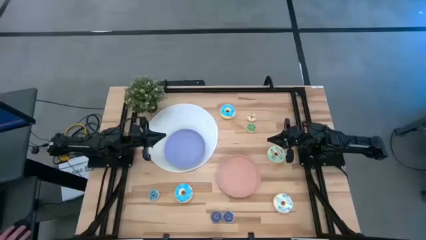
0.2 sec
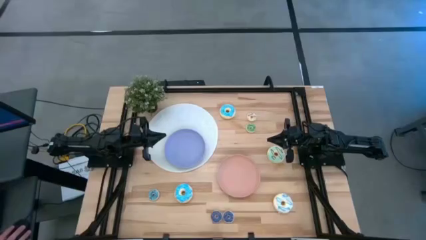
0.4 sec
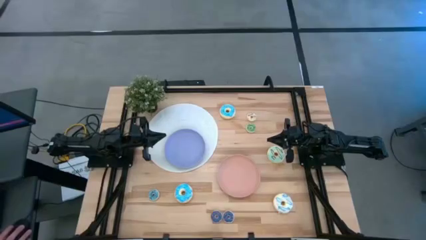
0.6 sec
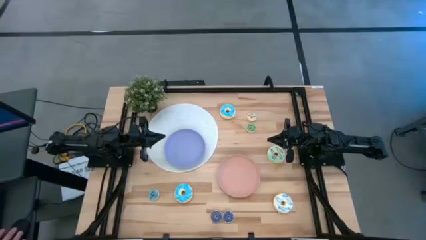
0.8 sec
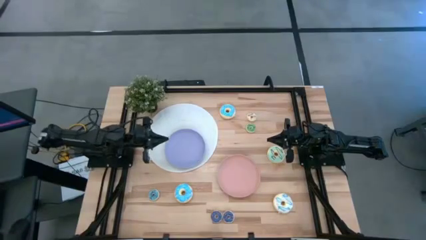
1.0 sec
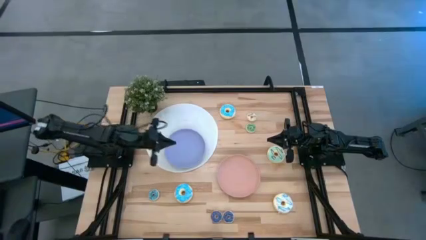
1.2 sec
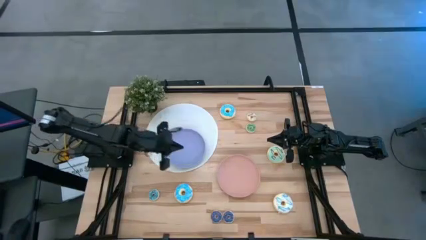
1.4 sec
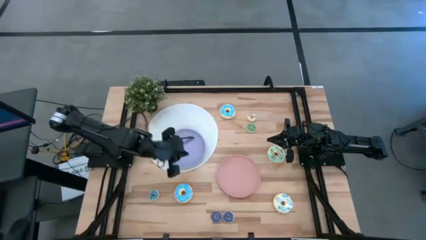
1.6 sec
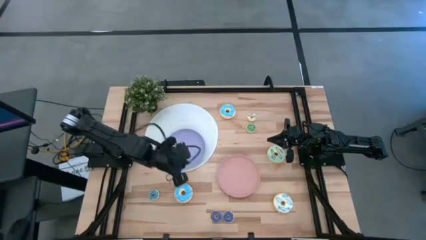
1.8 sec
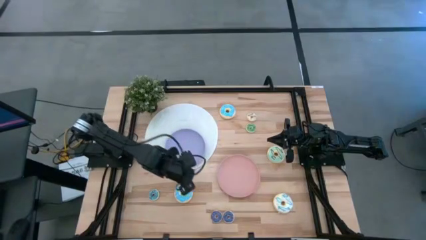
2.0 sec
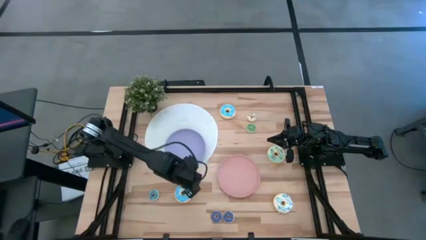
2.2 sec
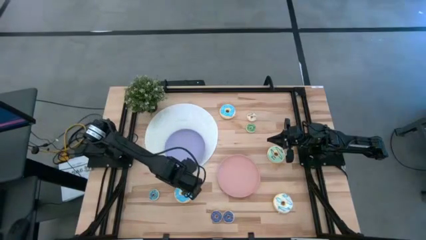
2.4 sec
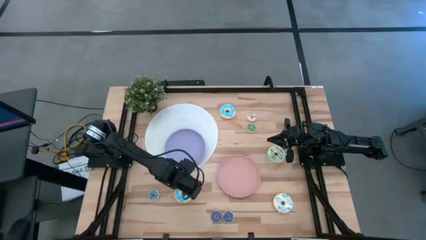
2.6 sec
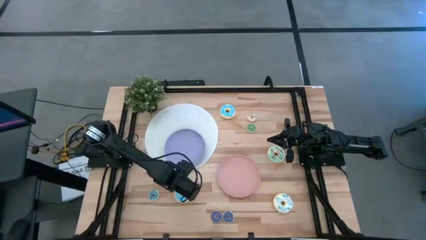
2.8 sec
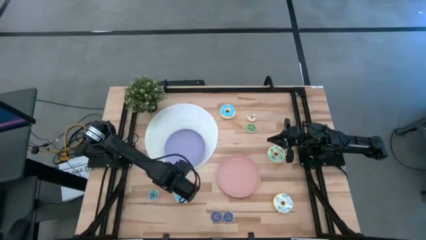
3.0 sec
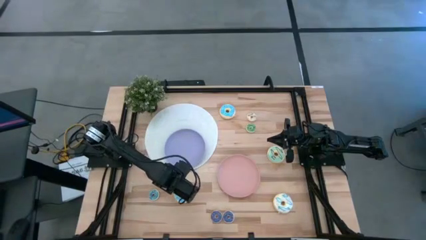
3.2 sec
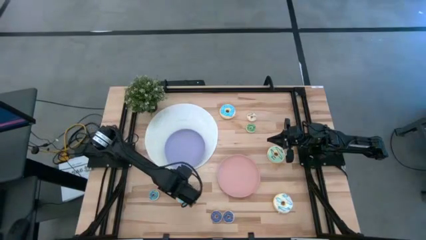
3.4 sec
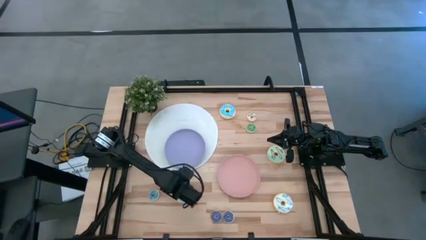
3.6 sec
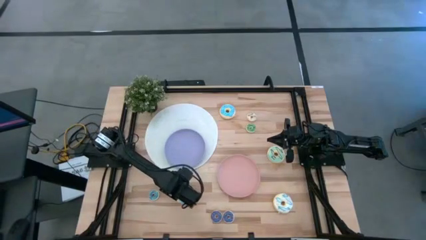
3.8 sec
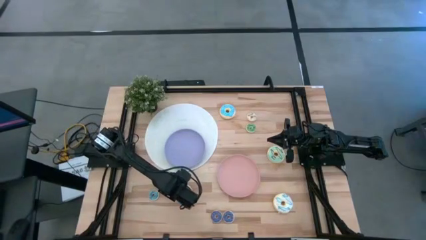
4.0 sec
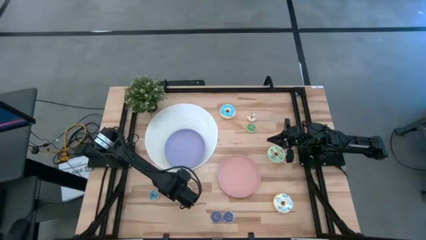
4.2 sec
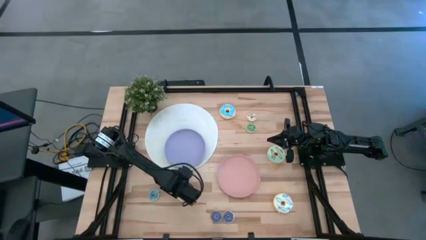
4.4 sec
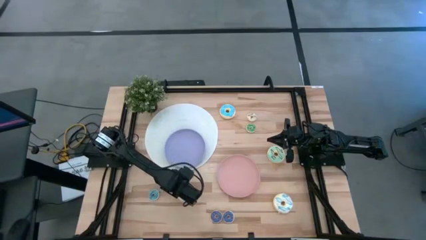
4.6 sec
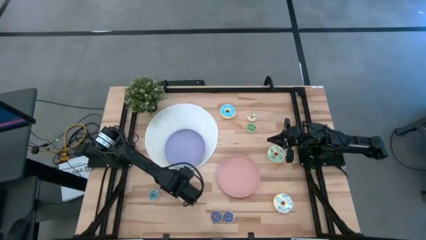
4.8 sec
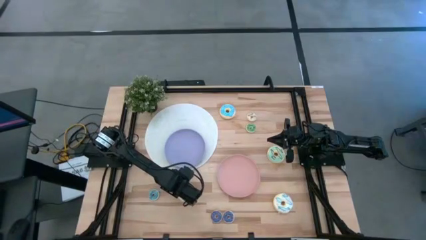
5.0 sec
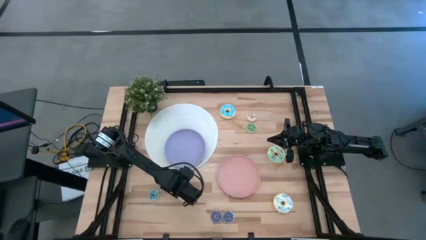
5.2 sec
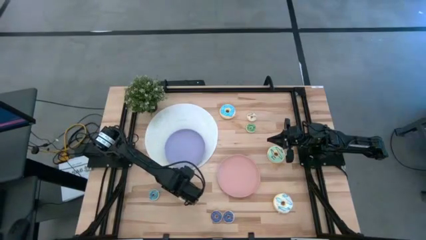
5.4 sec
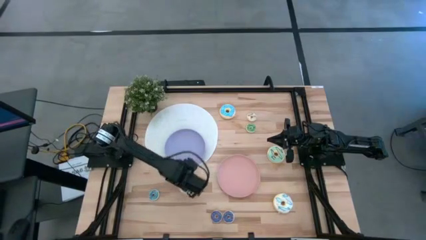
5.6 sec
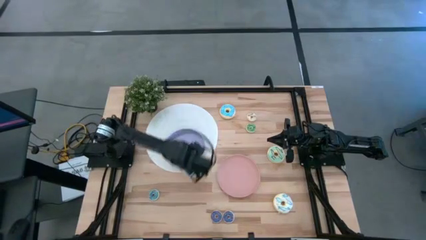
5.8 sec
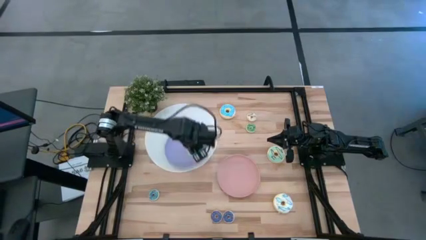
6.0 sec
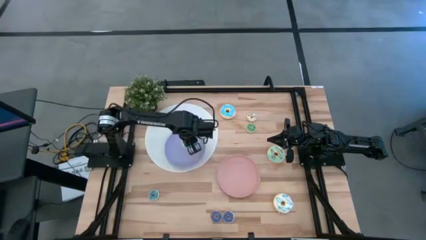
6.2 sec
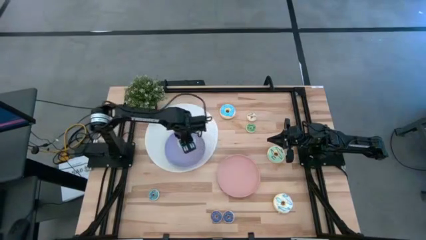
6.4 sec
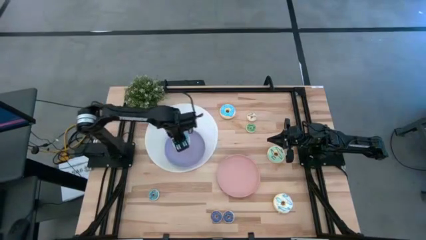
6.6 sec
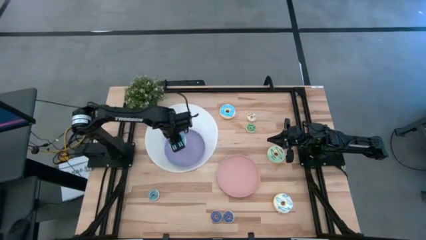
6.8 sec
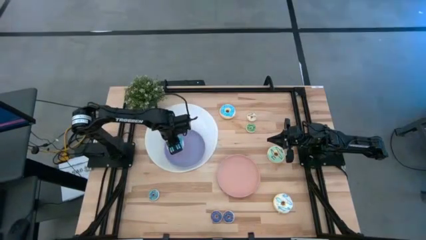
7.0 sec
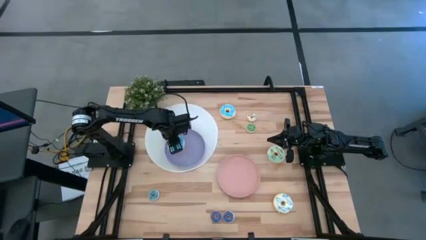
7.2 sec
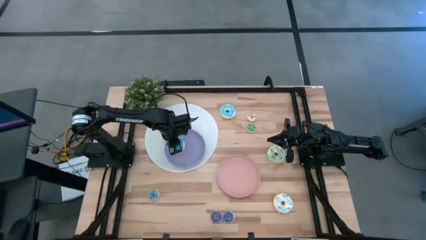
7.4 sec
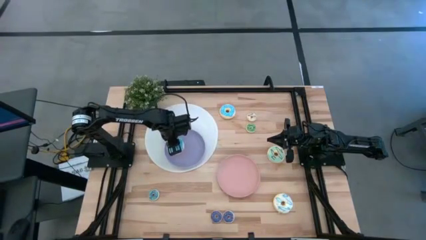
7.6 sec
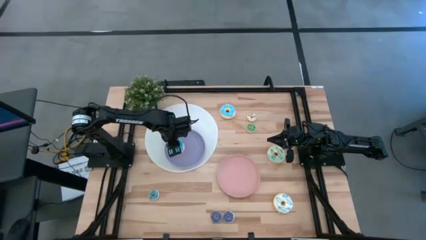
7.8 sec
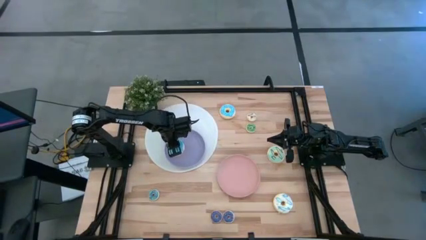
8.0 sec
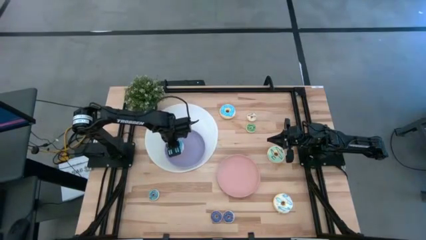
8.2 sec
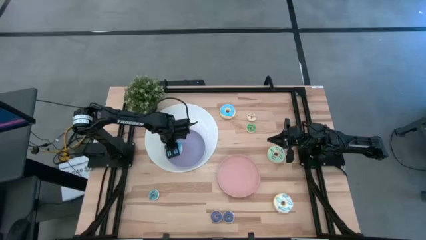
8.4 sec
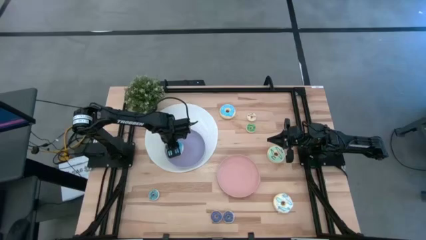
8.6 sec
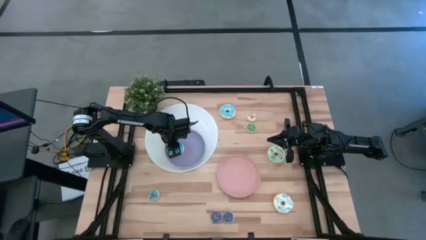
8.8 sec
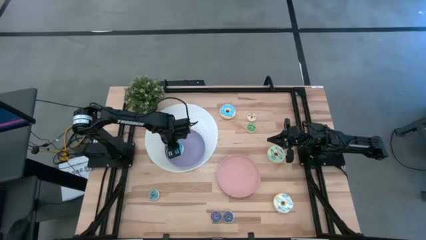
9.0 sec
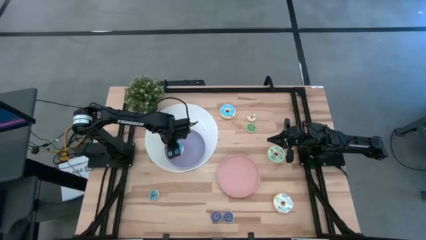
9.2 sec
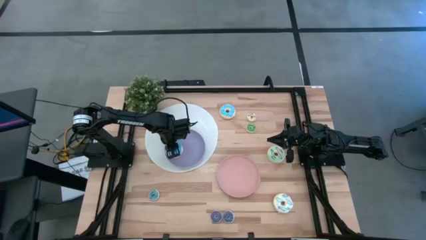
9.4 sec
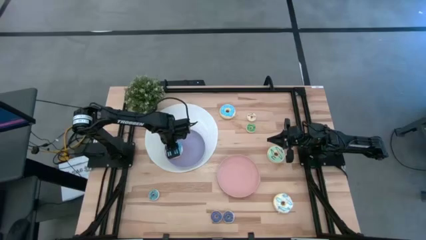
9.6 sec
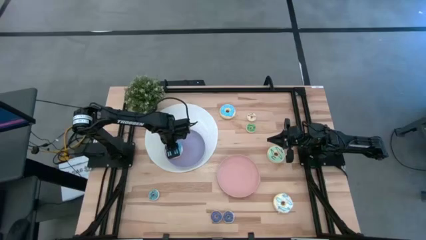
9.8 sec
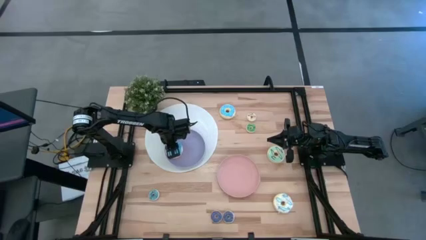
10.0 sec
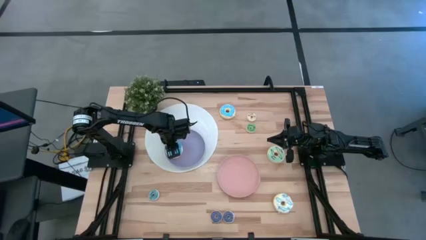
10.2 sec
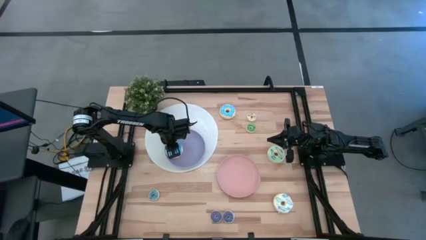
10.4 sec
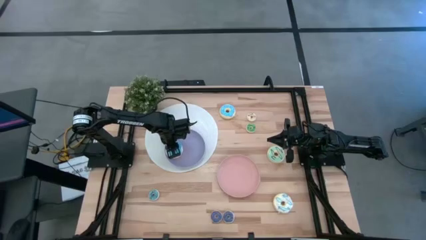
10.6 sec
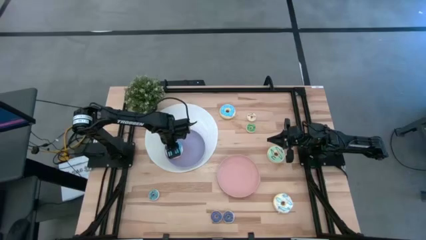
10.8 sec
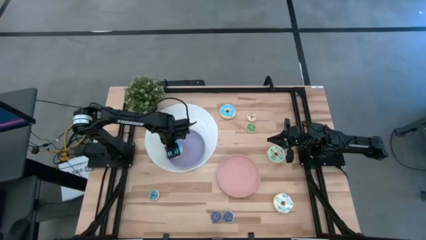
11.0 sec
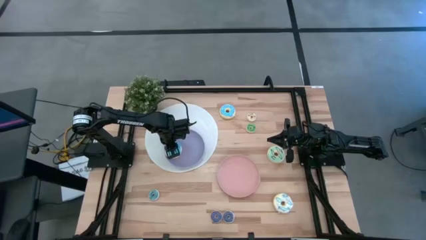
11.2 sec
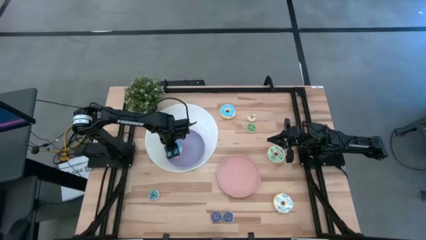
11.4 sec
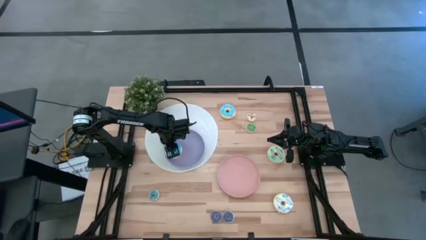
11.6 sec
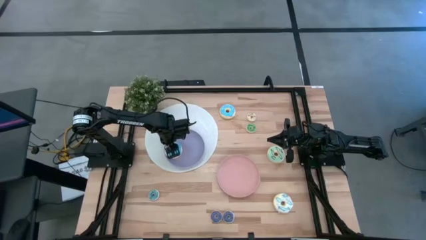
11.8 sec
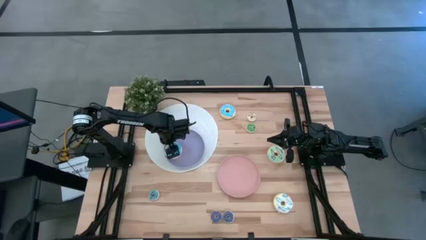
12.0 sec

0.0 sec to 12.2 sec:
Task: Pick & Place donuts
Put the big light blue donut on the purple plate

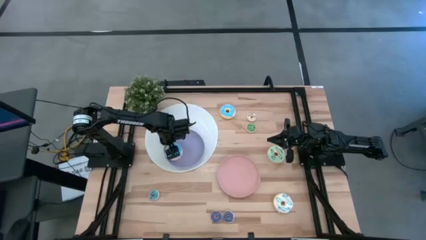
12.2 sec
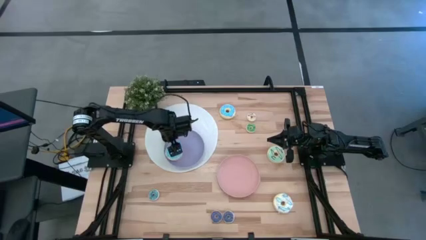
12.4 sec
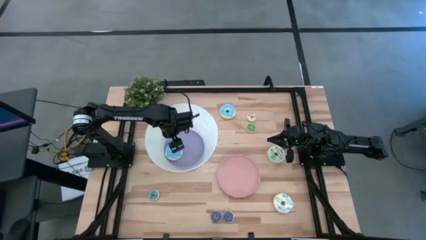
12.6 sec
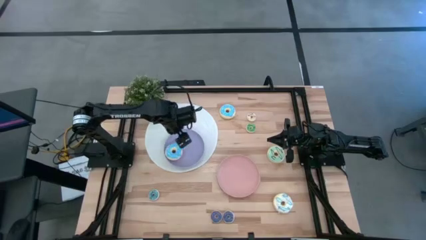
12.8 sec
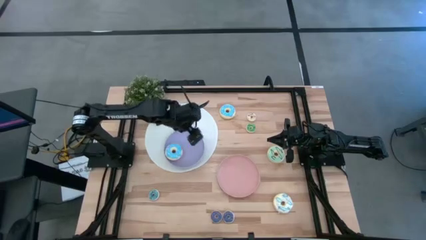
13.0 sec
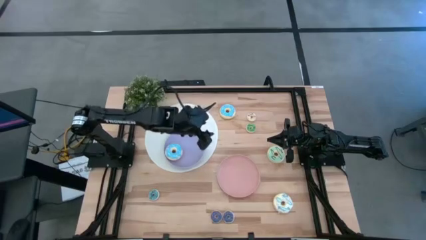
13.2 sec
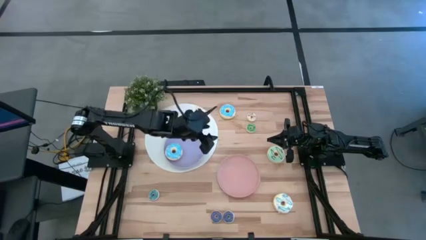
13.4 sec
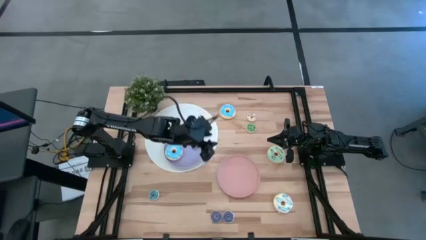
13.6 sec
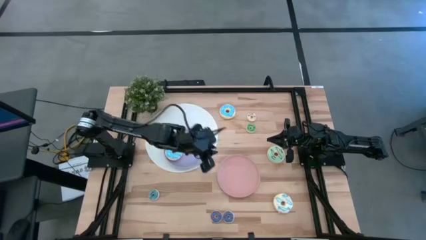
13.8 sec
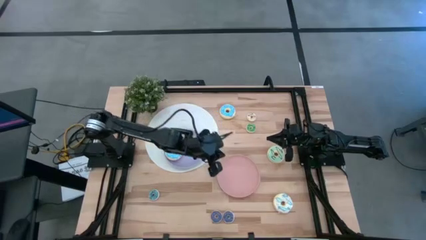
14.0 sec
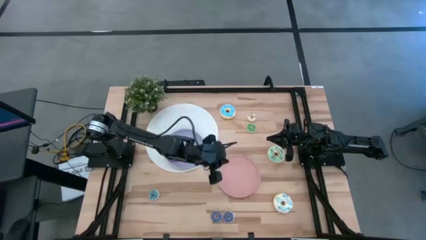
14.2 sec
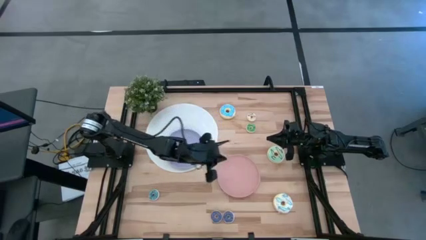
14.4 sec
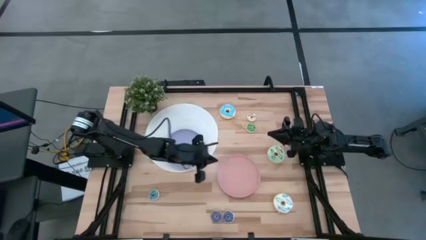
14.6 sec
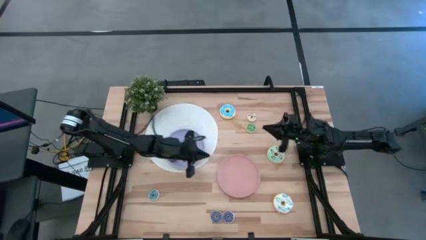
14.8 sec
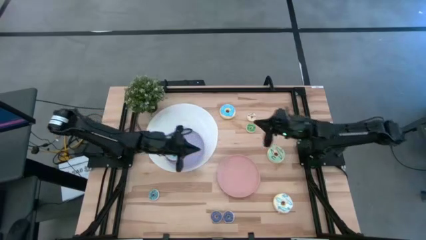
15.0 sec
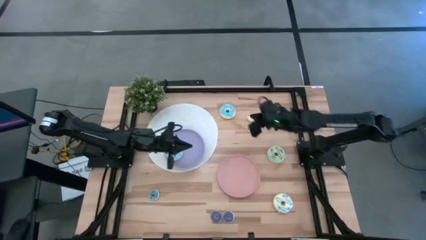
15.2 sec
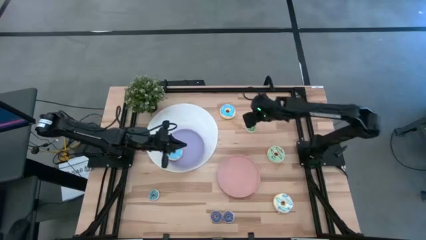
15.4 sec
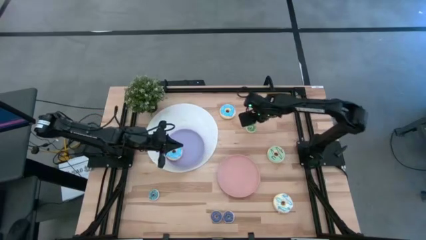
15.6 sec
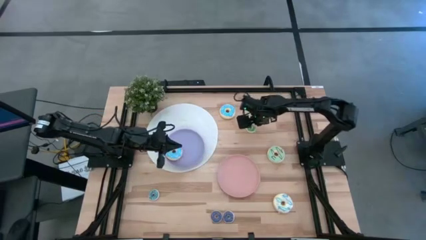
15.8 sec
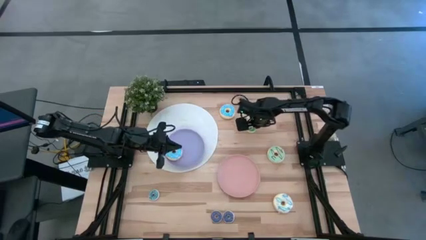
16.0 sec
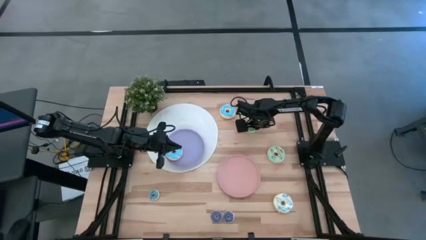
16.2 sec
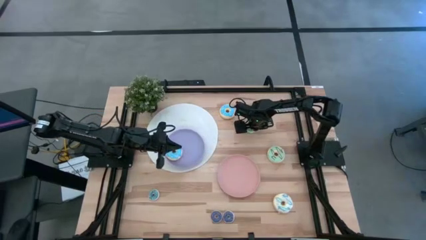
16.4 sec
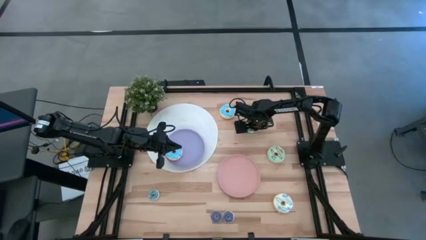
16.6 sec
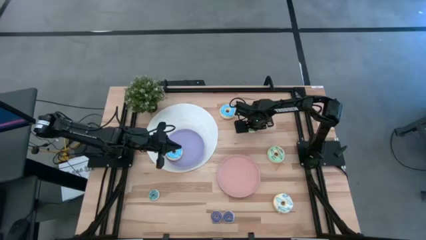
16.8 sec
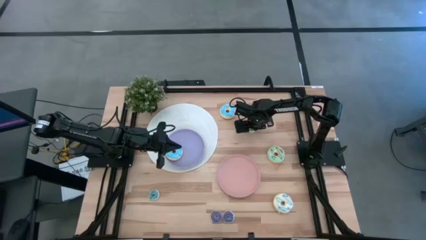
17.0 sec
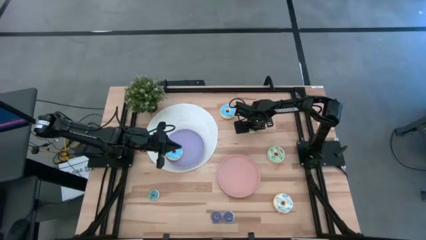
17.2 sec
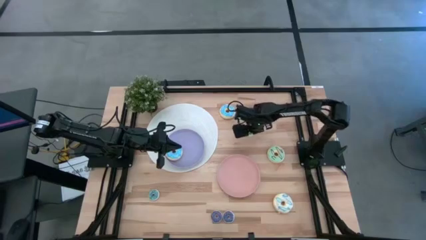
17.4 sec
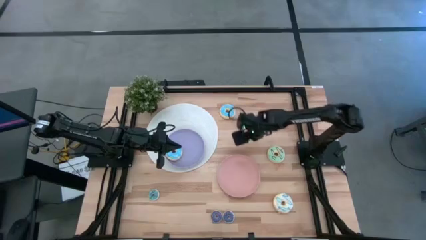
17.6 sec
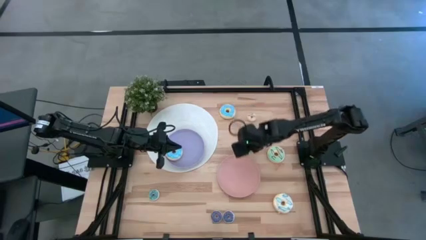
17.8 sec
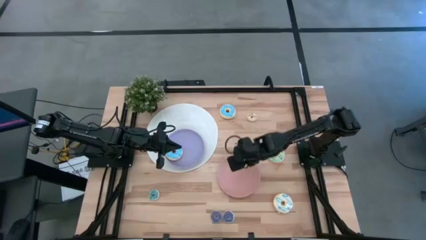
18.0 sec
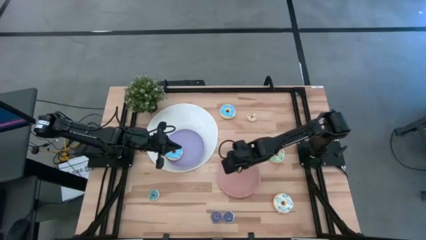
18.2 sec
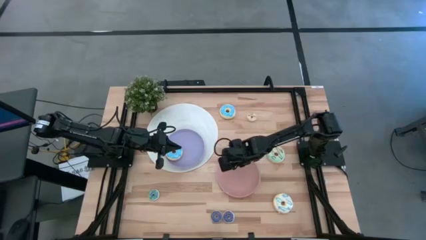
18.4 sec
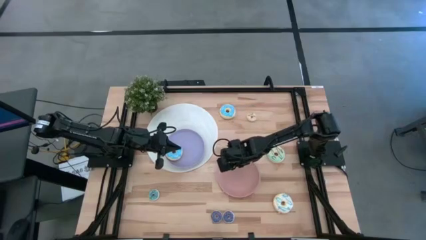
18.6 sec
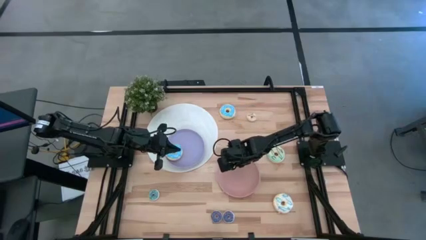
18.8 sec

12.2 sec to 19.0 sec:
Put the small green donut on the pink plate
